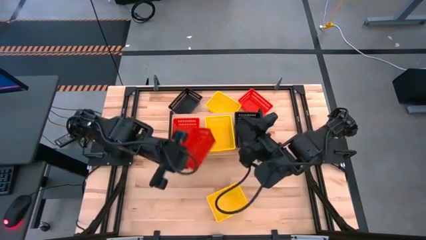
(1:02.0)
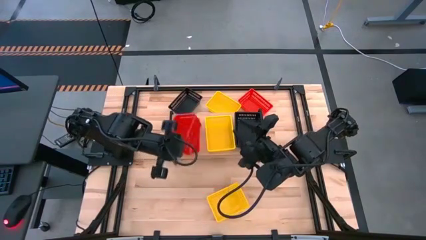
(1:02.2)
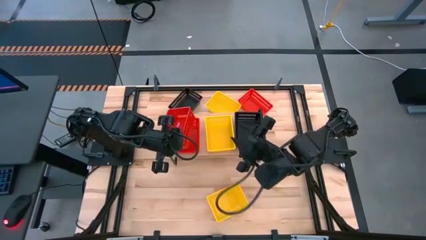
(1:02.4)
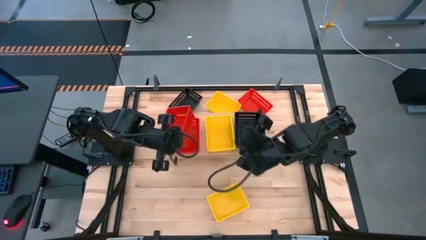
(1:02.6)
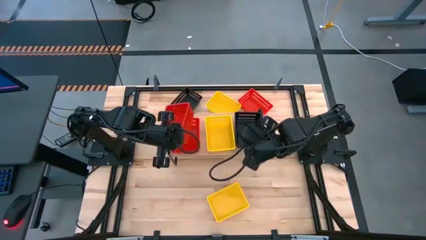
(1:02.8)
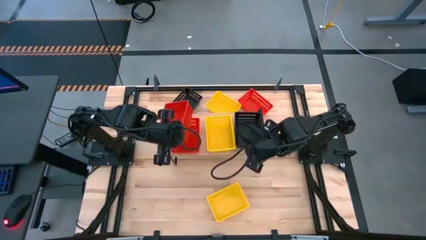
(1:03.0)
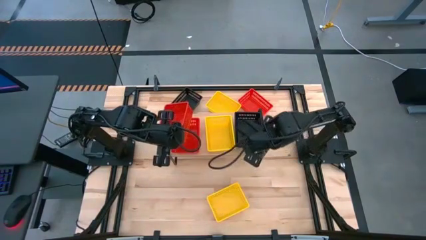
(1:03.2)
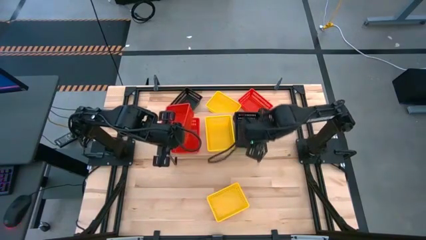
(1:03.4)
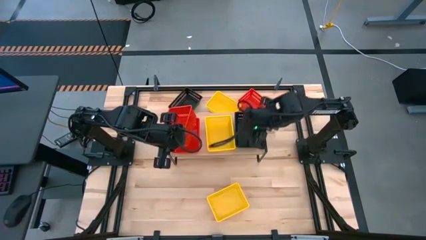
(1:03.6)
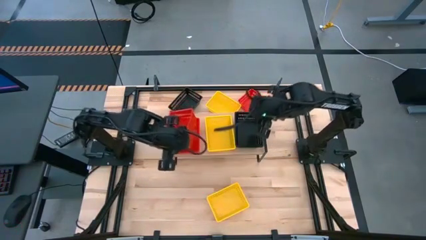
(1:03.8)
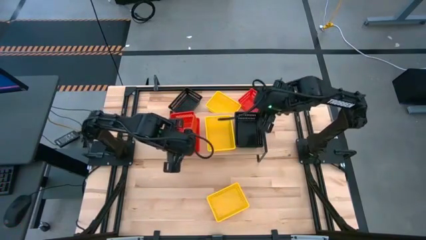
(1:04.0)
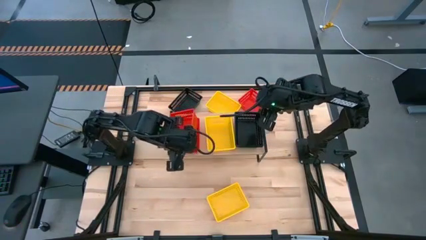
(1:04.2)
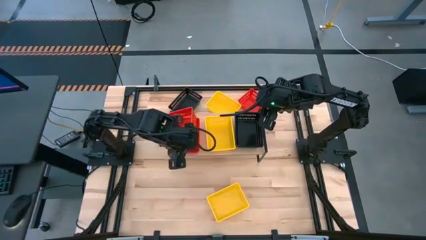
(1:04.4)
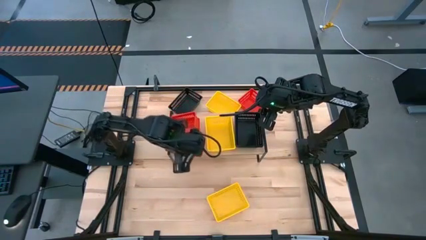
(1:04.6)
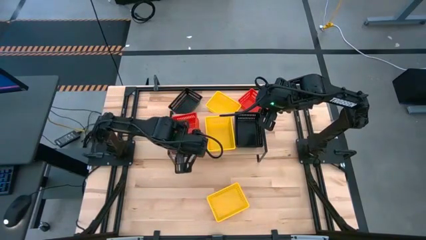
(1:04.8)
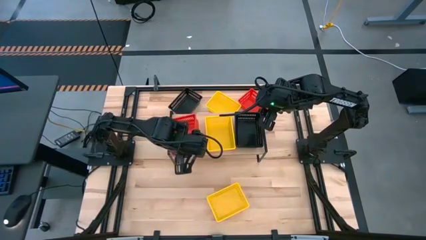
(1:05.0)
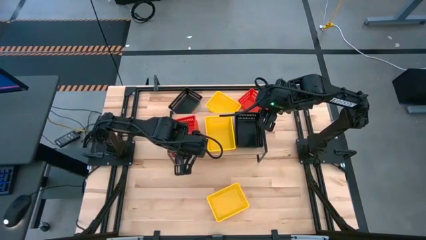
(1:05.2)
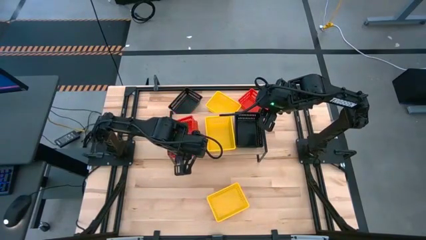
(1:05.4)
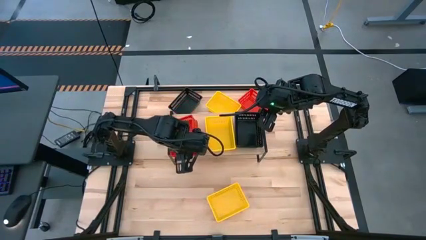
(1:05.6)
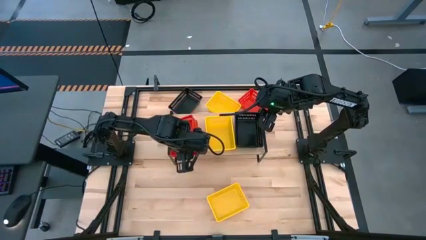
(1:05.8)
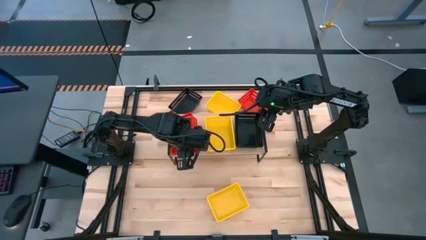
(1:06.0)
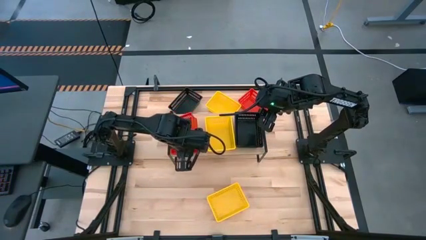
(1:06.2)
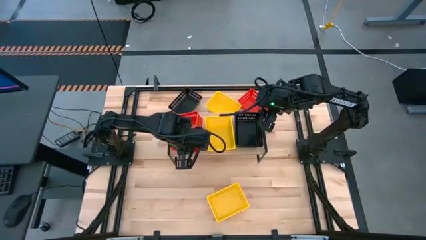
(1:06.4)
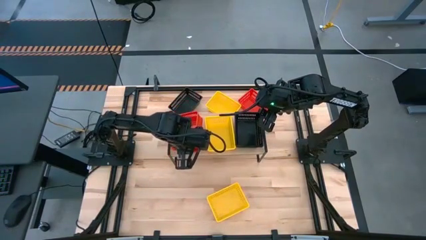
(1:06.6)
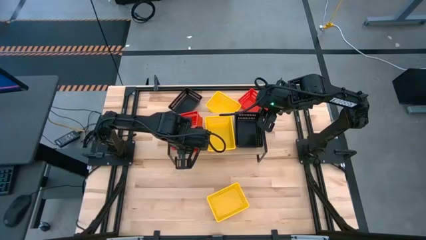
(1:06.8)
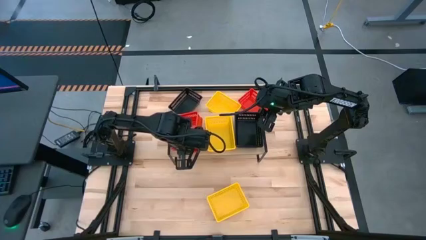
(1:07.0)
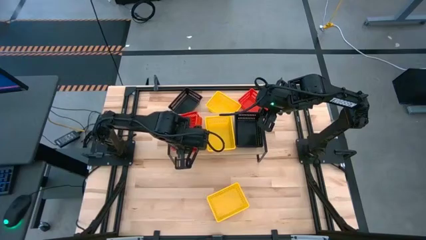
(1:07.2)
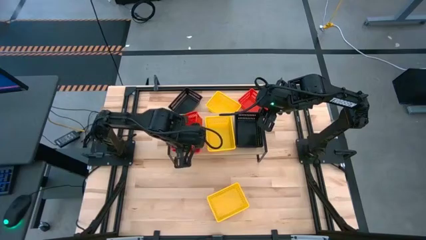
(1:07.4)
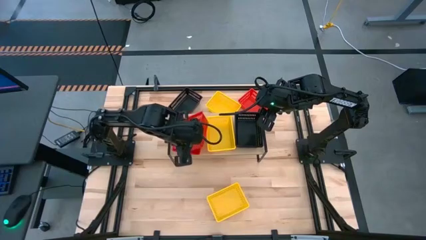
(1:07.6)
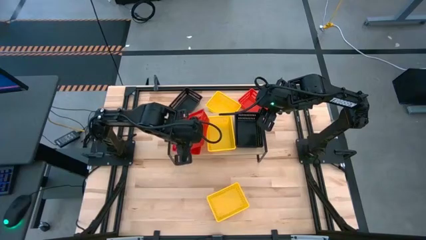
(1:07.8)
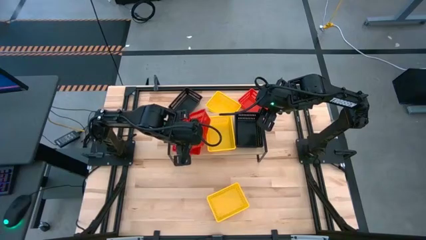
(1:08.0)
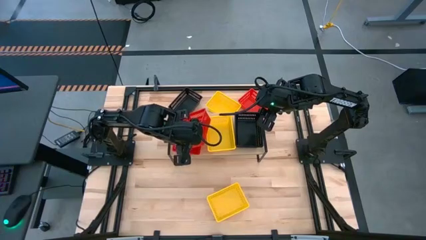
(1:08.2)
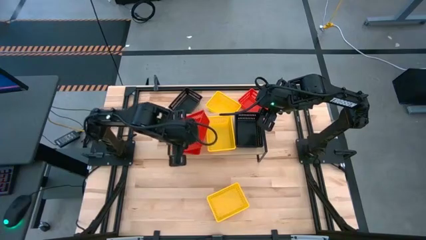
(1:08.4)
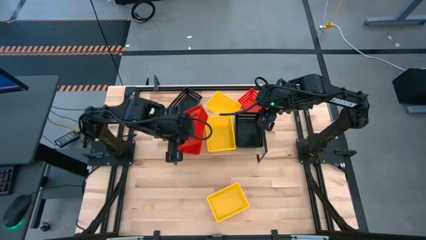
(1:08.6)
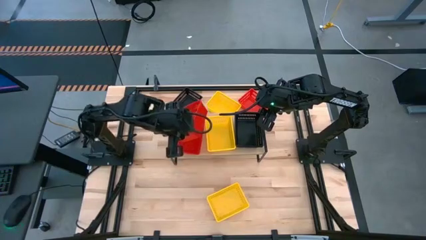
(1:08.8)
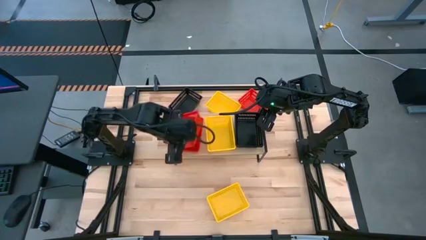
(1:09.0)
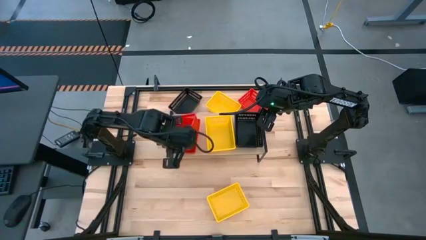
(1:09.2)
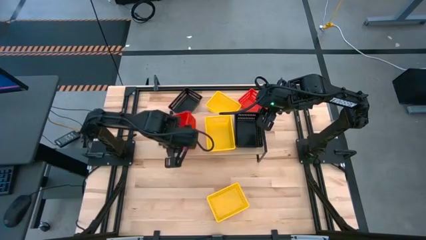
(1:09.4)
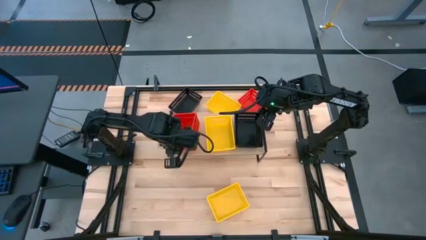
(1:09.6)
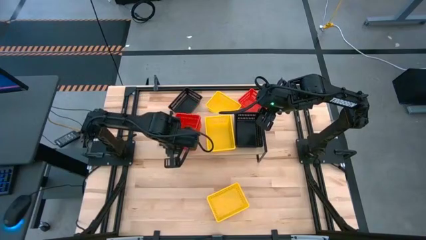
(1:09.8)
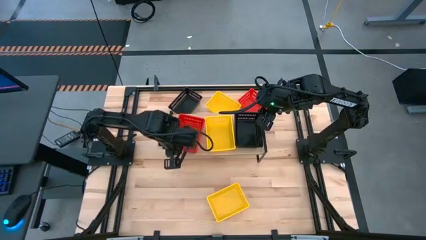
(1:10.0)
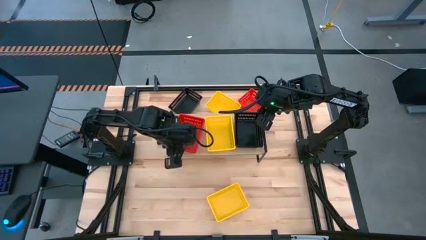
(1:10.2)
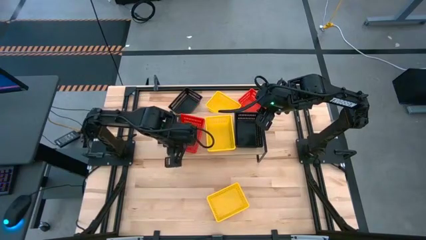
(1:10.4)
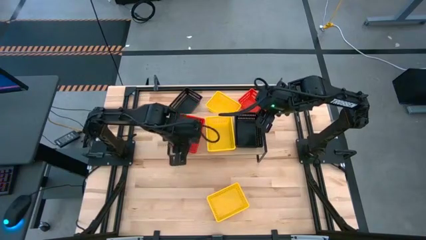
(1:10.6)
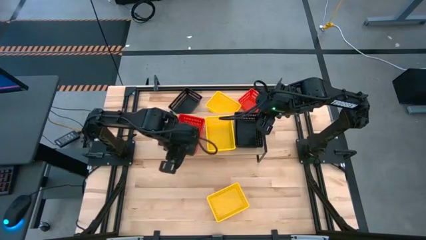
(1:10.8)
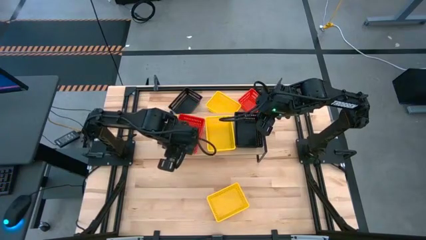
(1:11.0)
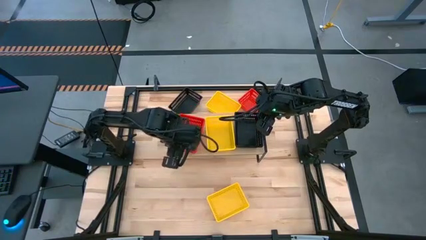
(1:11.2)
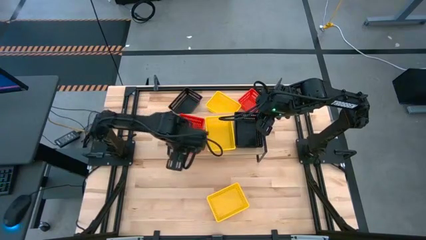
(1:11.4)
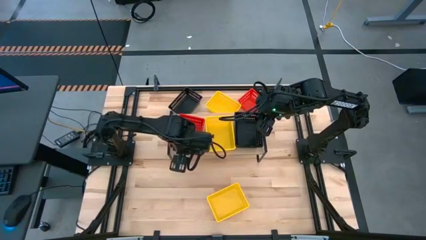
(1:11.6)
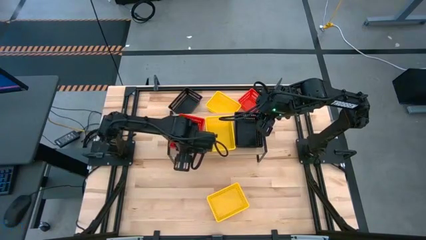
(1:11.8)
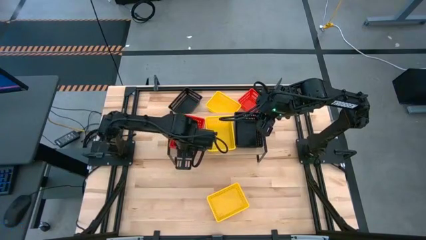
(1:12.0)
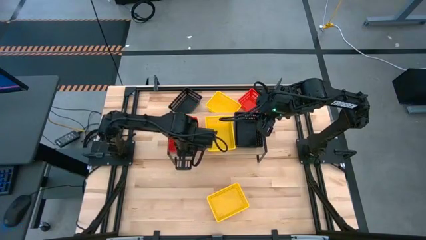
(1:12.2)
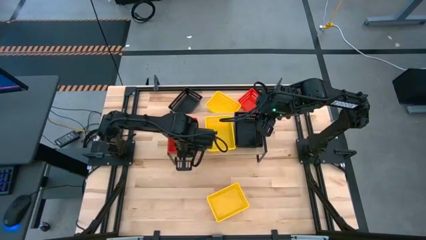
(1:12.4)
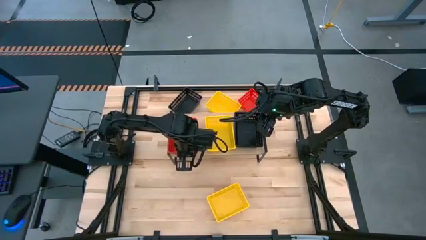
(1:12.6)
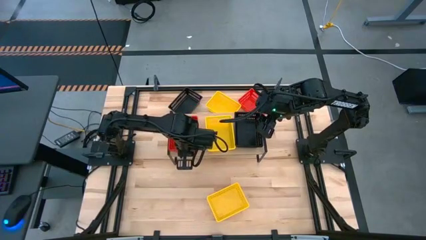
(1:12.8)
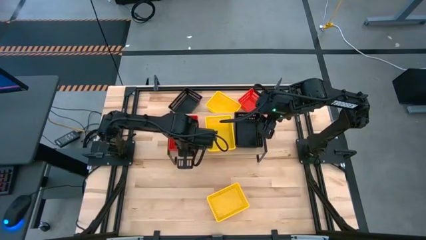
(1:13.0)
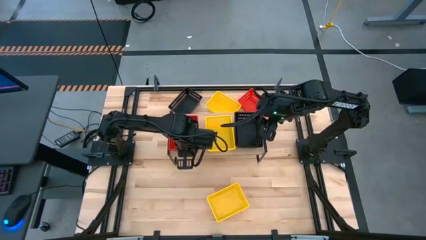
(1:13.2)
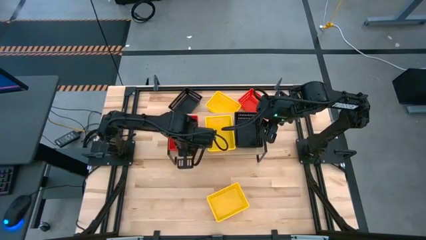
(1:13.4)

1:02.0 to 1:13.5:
Task: Stack baskets on shelf by color
Stack the bottom red bin on top of the red bin on the shelf

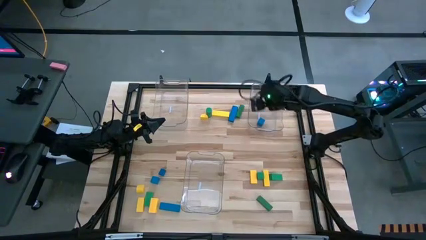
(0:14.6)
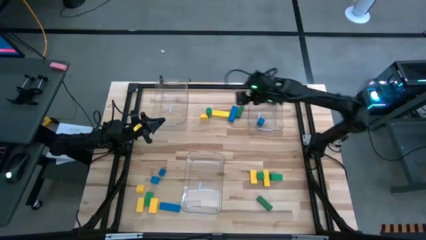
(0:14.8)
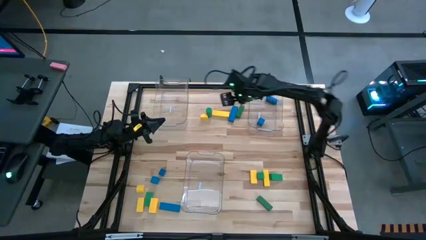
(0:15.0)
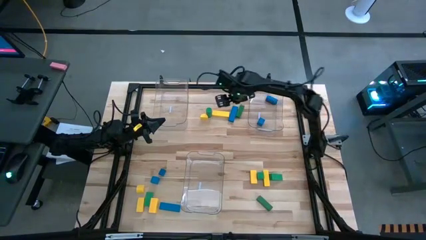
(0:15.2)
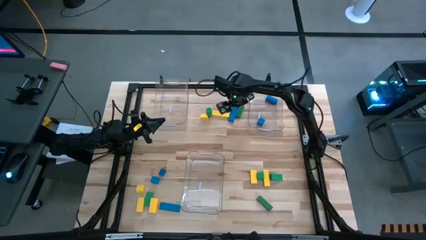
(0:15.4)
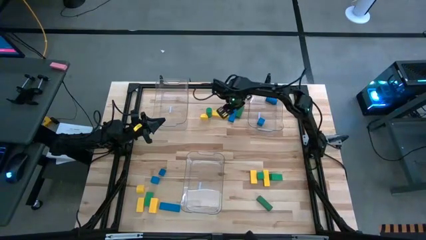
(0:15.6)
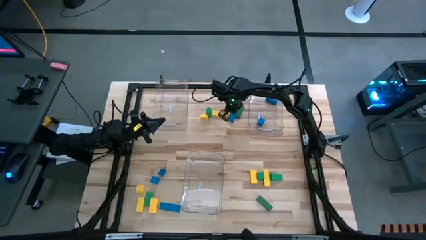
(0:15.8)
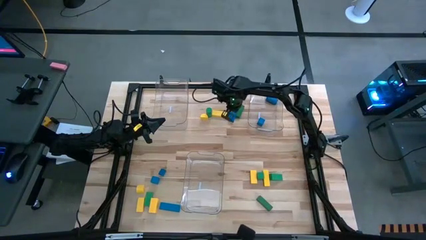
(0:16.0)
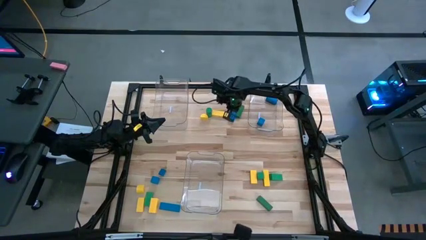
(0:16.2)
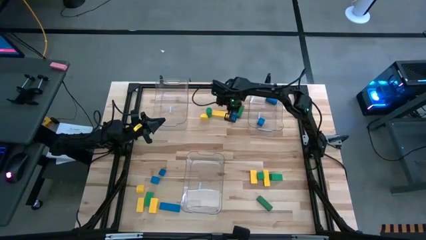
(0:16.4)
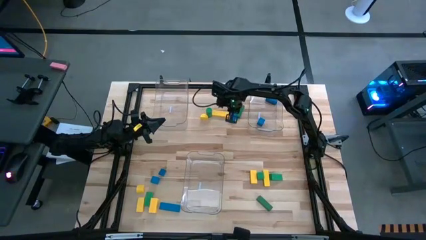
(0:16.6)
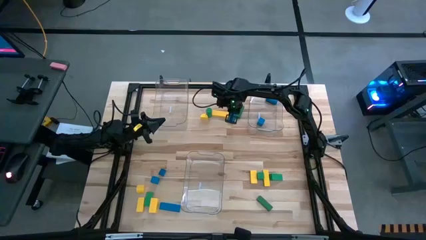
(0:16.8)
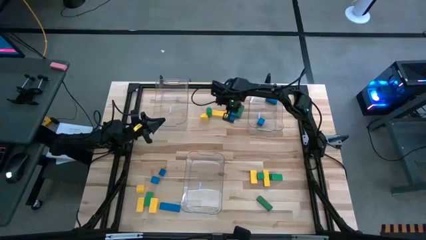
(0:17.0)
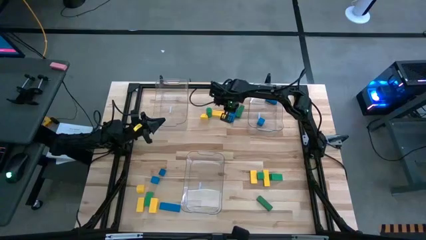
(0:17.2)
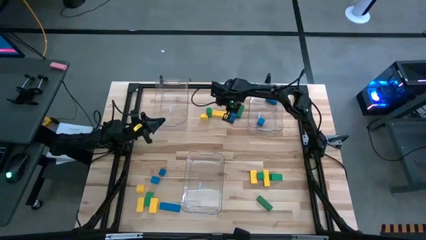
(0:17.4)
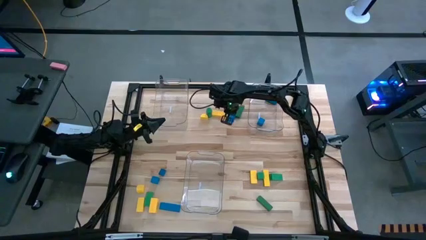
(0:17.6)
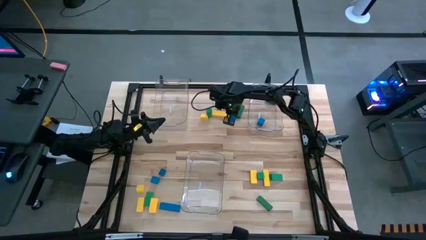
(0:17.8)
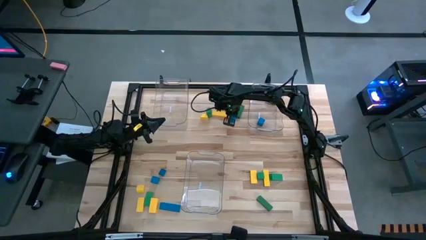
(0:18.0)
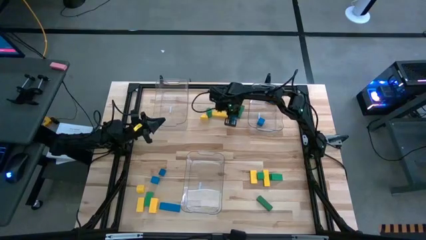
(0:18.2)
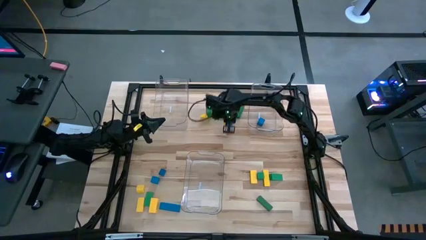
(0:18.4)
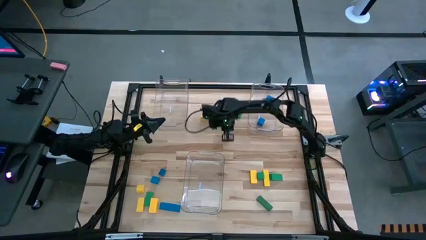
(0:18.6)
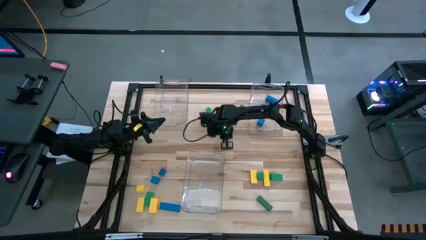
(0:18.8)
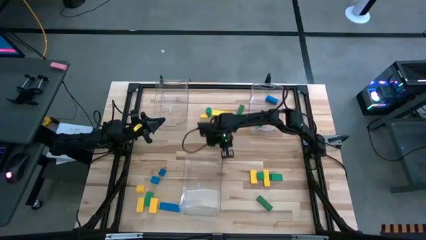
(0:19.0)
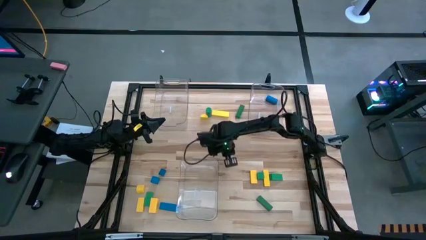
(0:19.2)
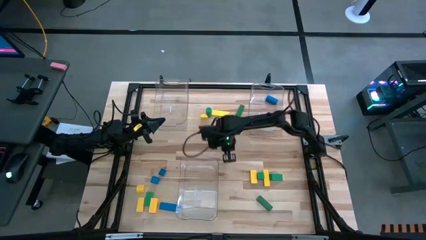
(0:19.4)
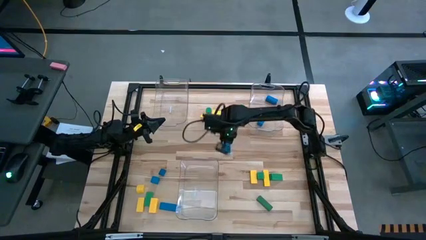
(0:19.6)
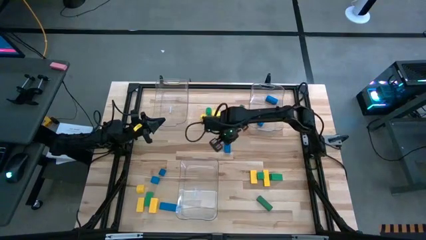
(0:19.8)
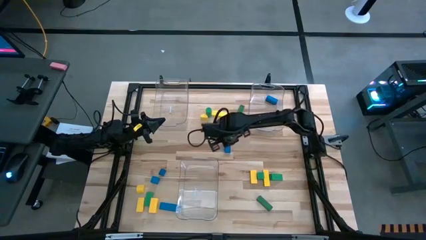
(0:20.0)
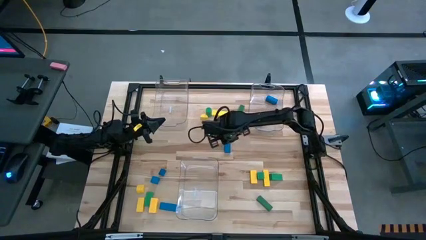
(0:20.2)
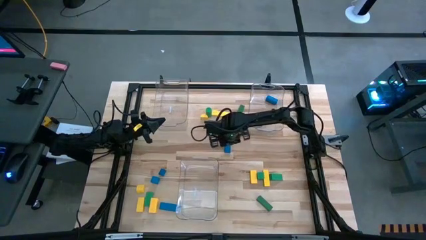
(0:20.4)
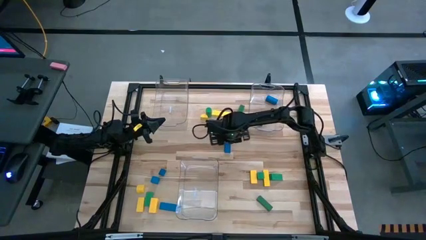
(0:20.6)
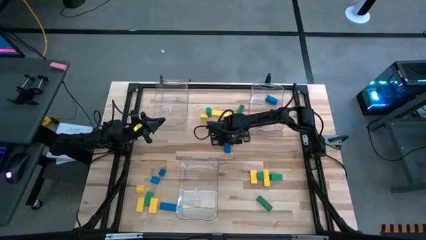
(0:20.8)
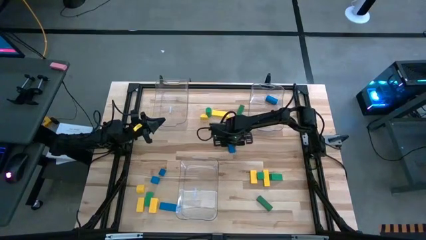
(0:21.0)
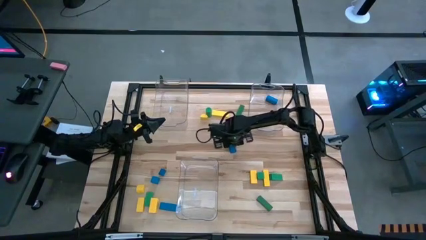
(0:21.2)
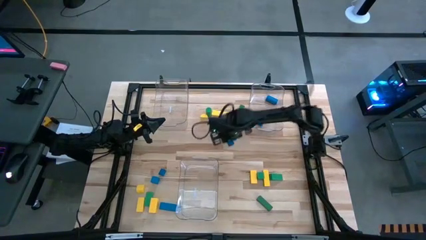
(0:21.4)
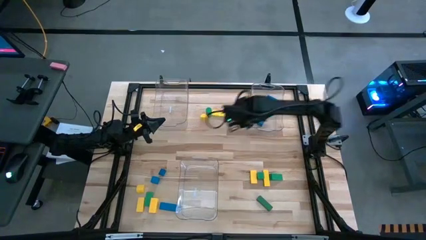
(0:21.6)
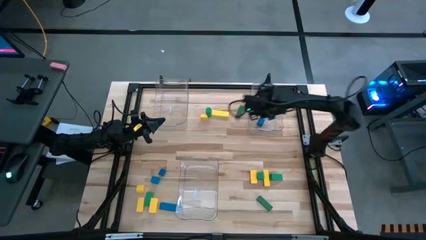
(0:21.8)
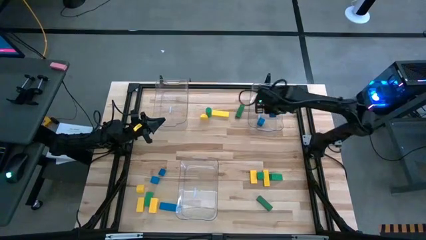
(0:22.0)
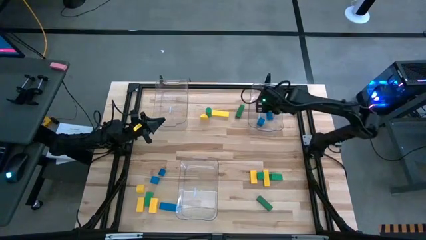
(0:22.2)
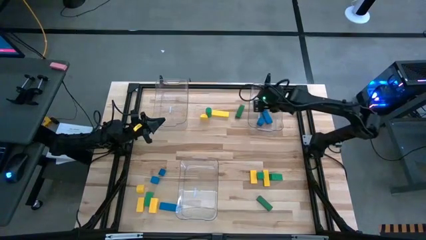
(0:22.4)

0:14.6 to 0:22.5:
Task: Sort blocks
Put the blue block into the top right transparent bin
